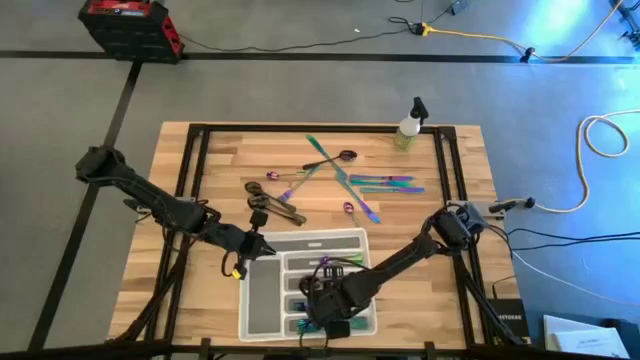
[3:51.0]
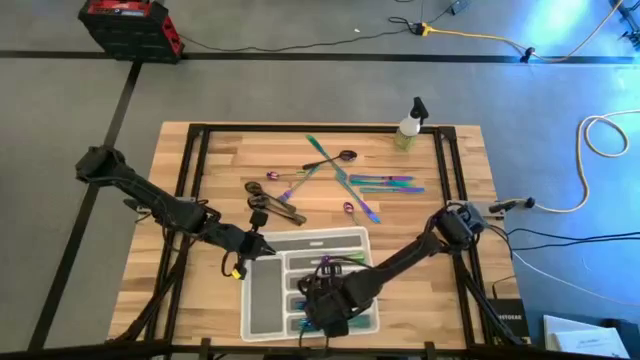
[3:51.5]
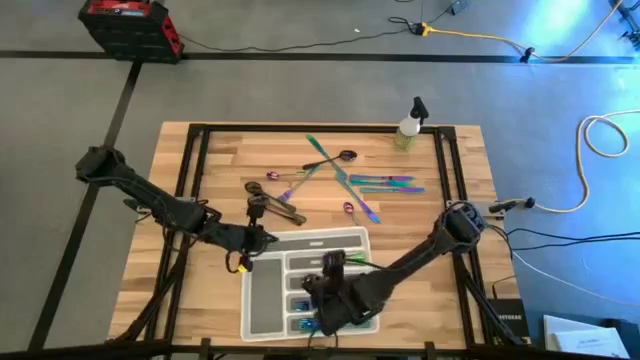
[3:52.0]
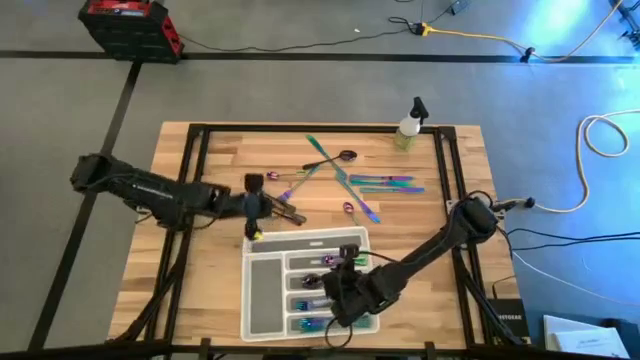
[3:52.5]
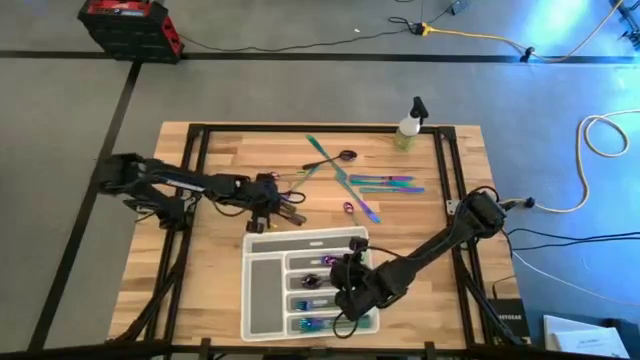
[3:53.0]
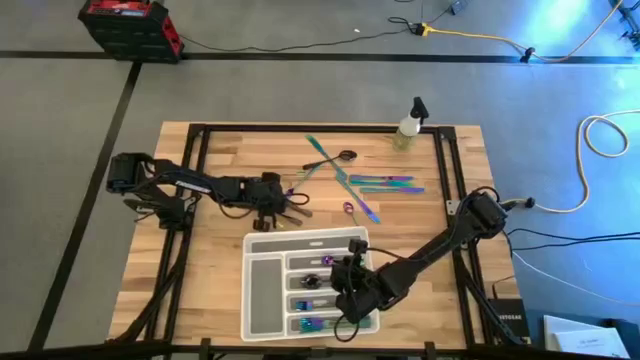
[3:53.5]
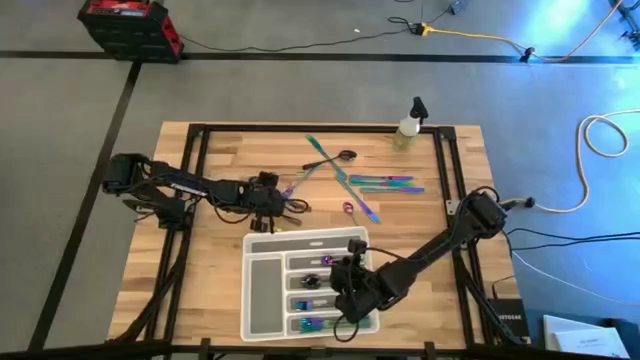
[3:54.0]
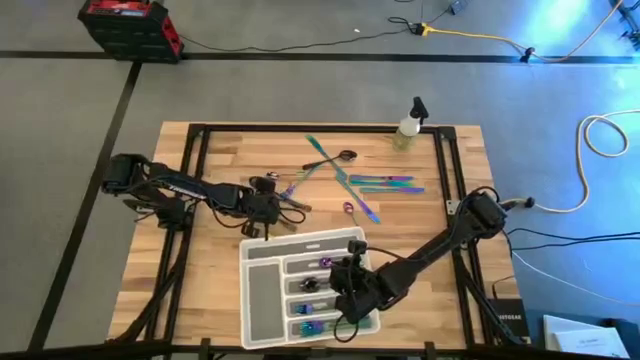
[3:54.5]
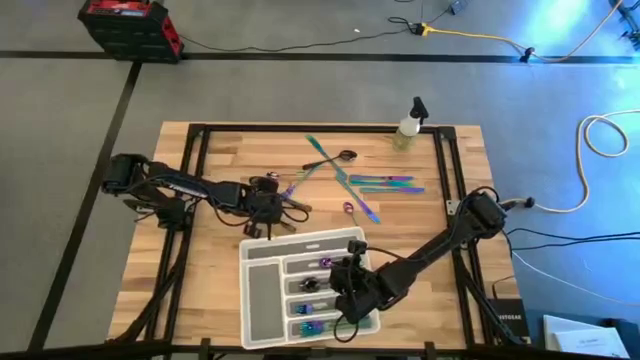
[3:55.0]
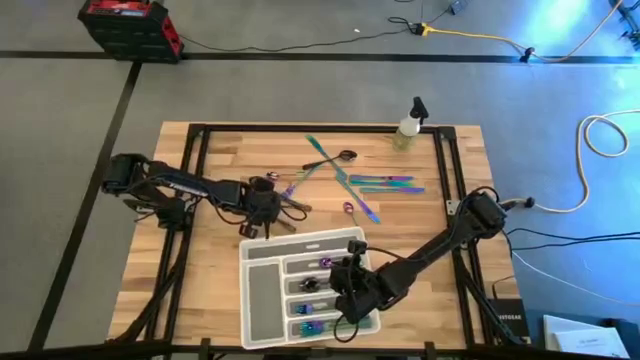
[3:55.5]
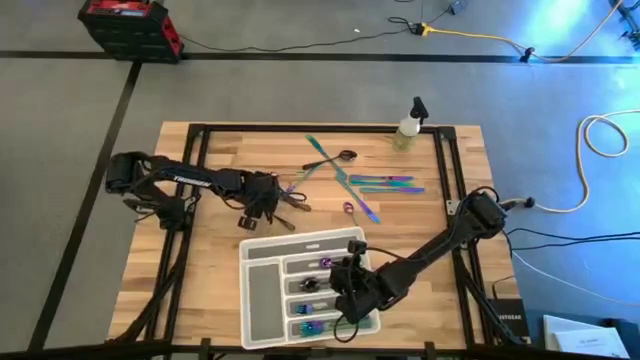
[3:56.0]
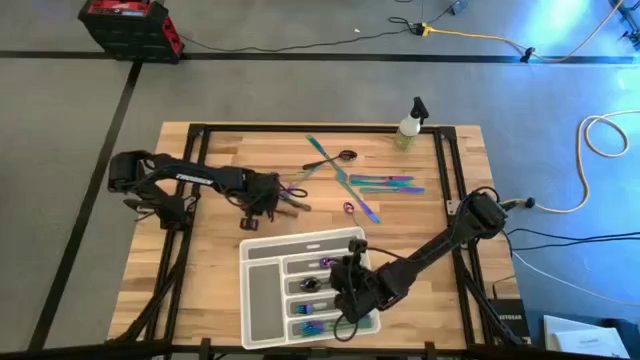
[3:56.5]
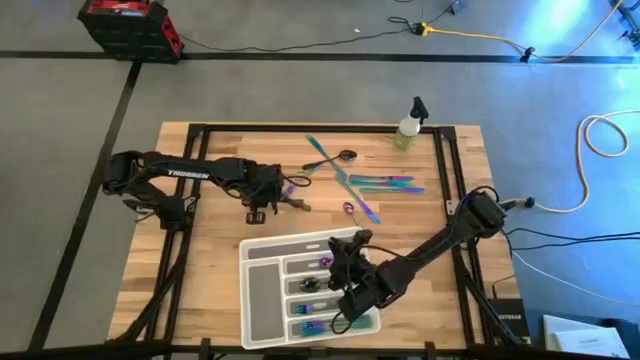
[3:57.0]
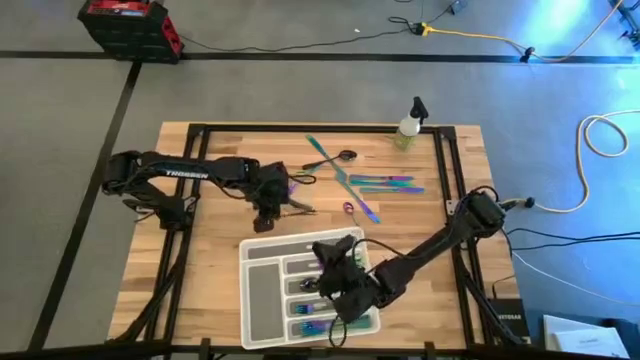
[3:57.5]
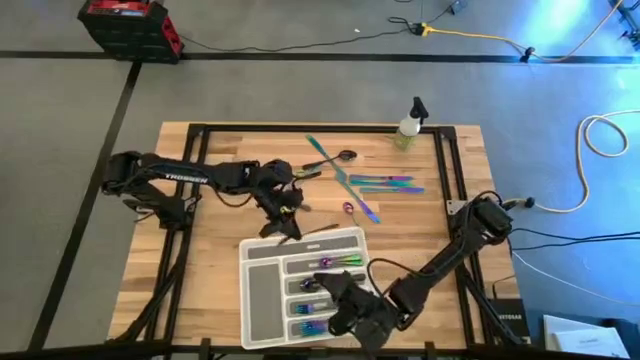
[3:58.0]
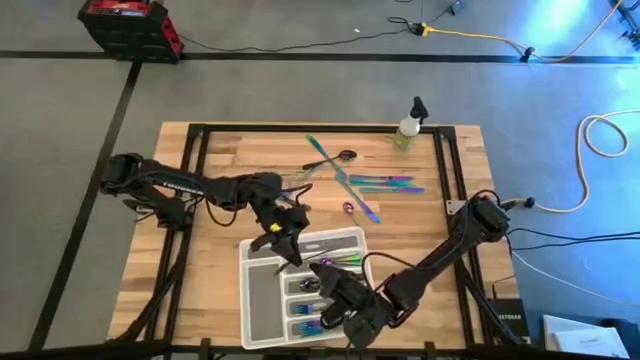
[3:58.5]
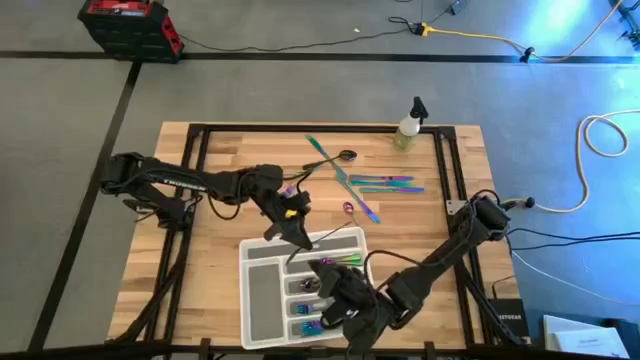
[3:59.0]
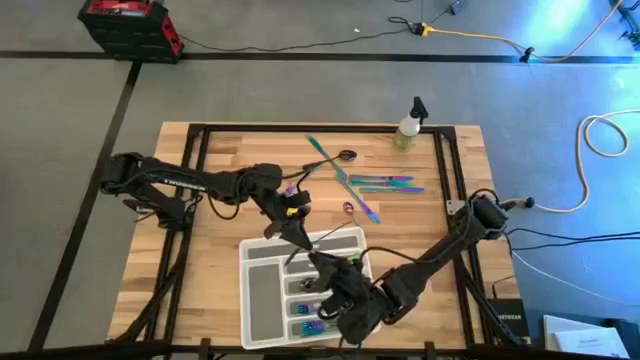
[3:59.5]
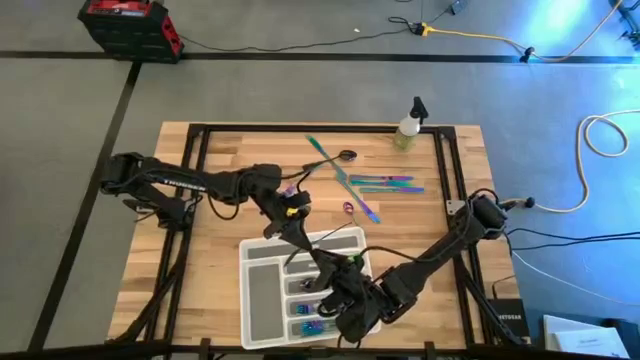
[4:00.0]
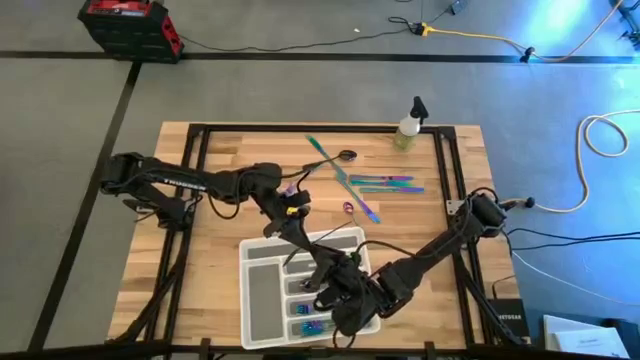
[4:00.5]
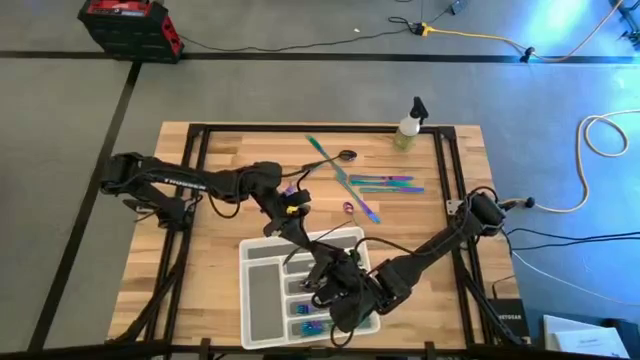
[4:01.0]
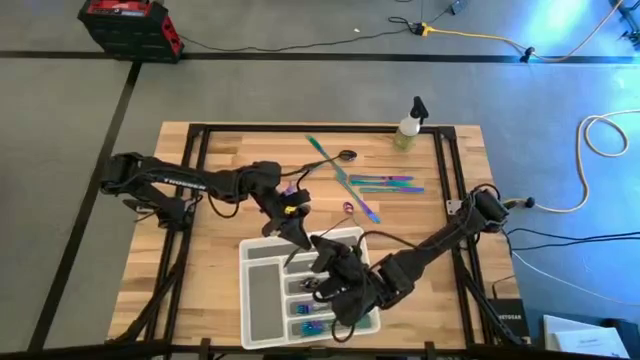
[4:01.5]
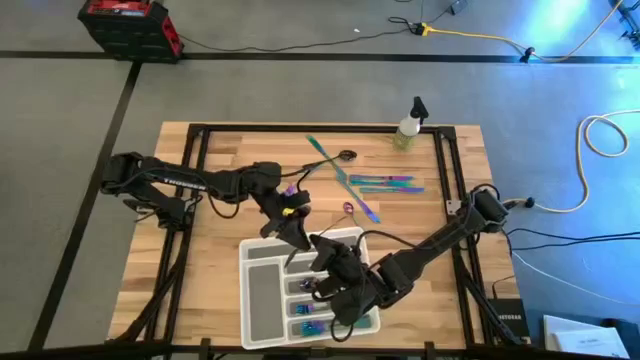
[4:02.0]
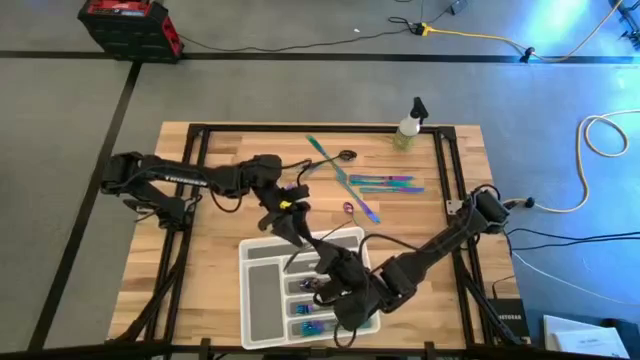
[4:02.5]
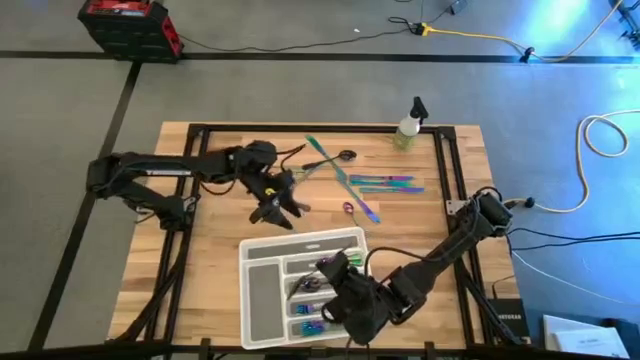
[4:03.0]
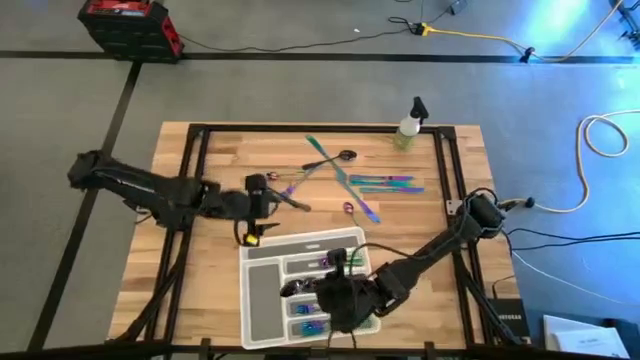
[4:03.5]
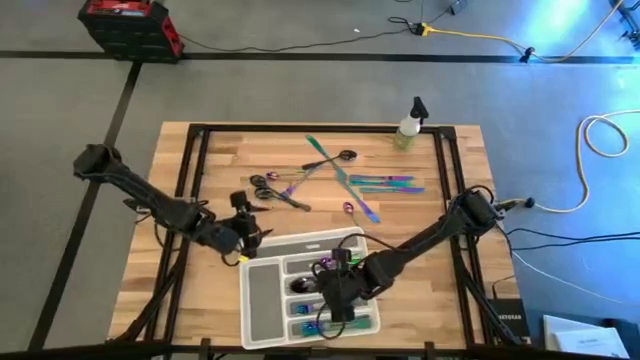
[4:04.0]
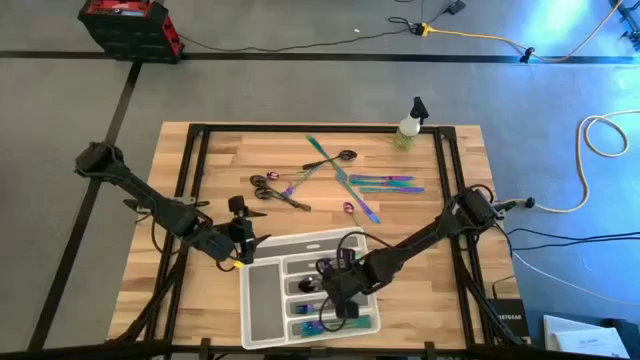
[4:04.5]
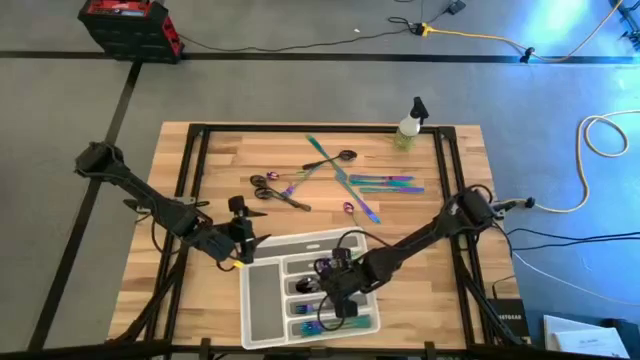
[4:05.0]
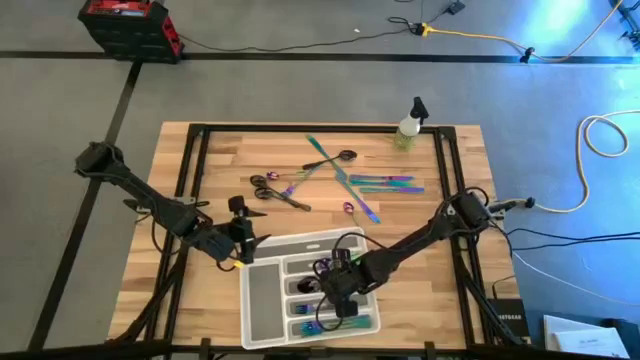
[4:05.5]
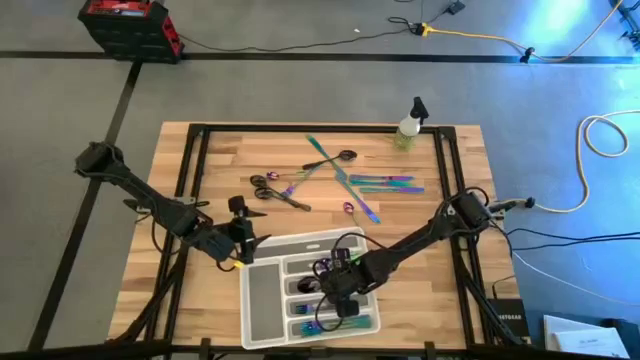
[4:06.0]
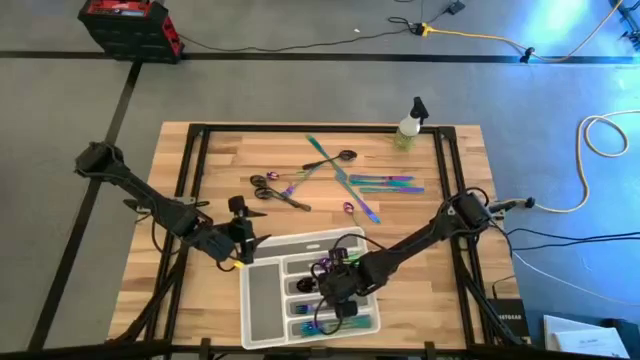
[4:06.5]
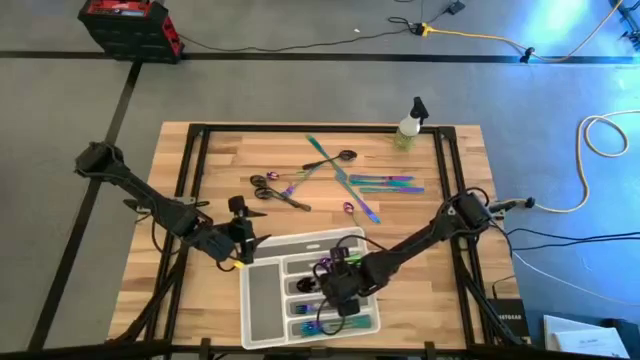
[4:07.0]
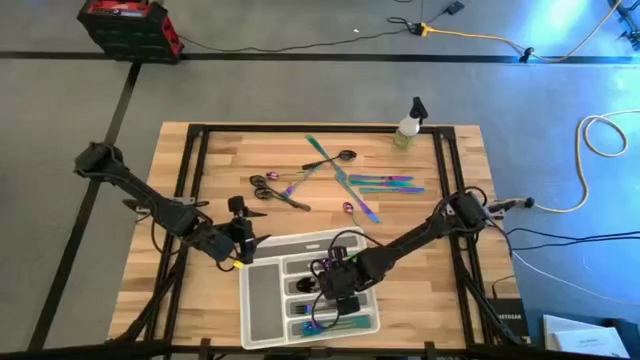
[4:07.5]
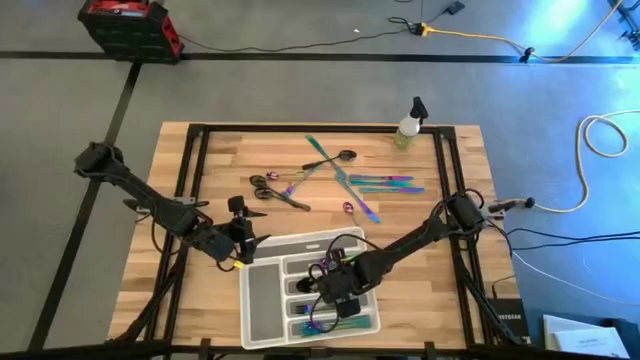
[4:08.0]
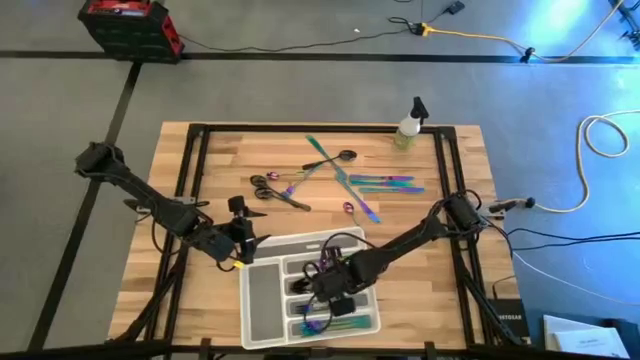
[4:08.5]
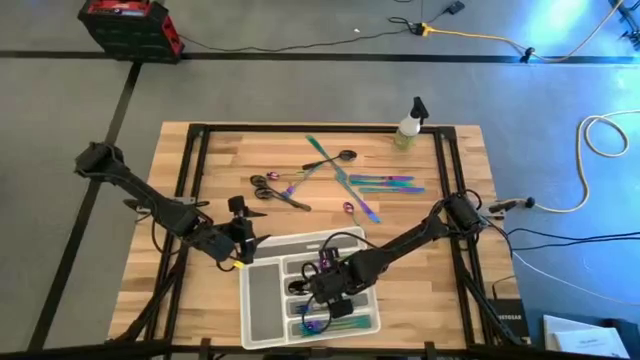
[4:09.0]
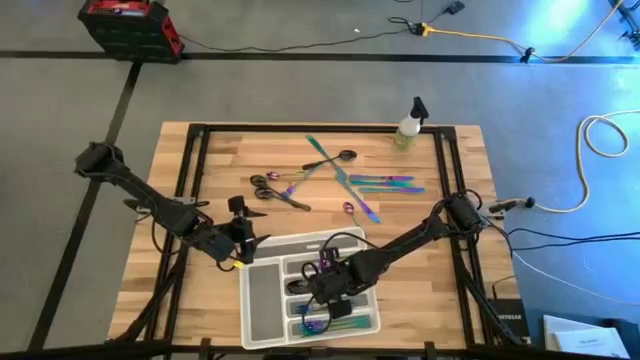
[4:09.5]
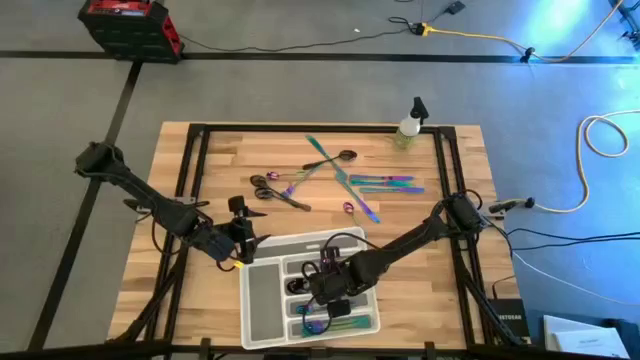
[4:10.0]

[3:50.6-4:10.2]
Task: Sort silverware
Put the black spoon into the white silverware tray

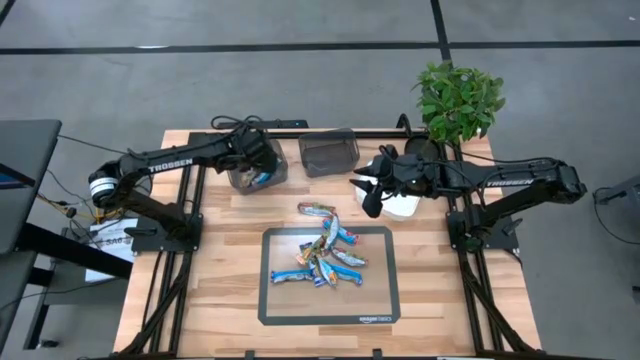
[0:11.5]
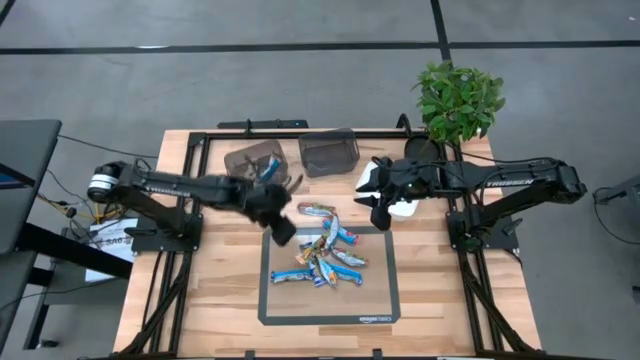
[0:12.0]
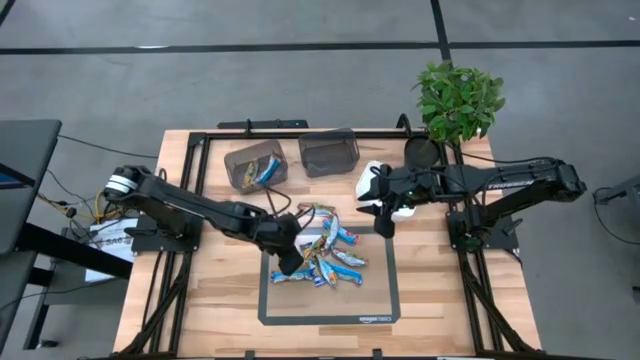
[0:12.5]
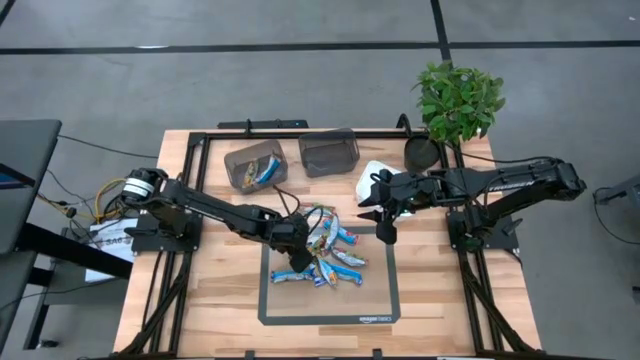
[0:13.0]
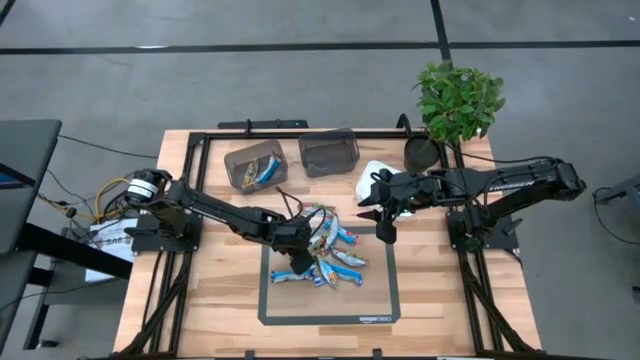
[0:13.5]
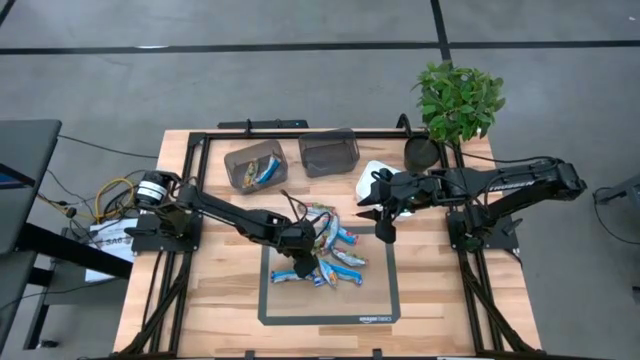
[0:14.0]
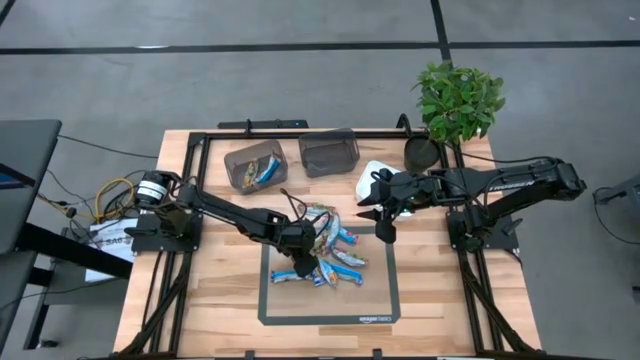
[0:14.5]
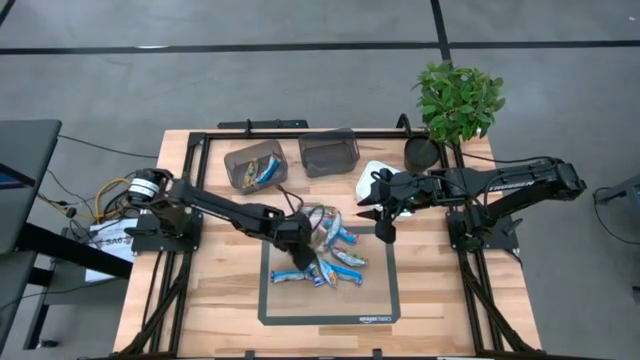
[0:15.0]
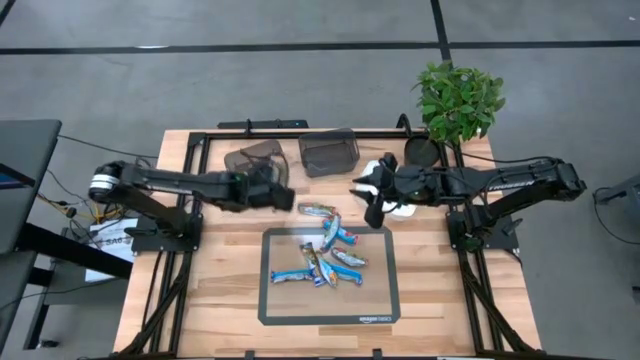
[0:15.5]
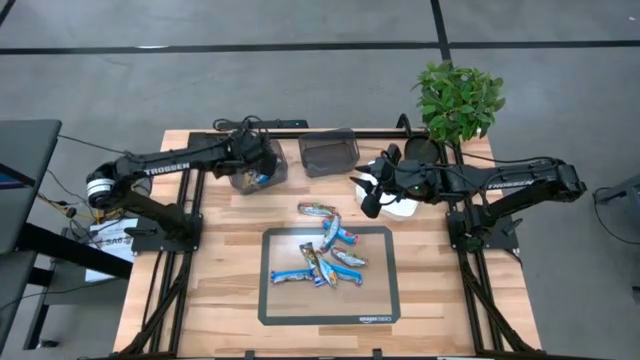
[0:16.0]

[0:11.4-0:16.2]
Task: Pick and place Granola Bars by type
Put the yellow granola bar into the left black bin
